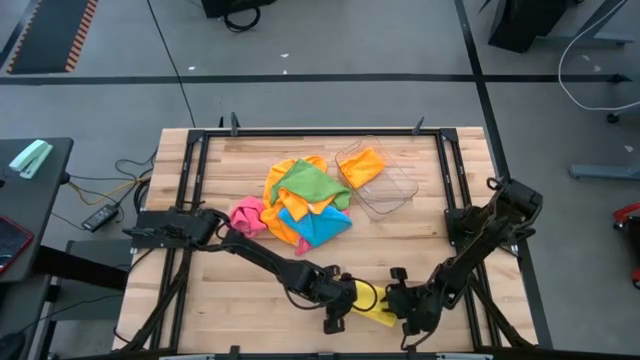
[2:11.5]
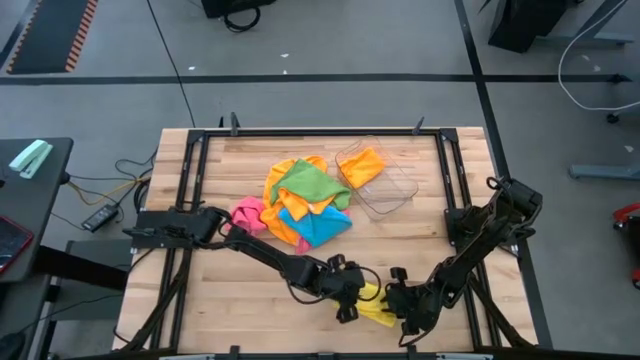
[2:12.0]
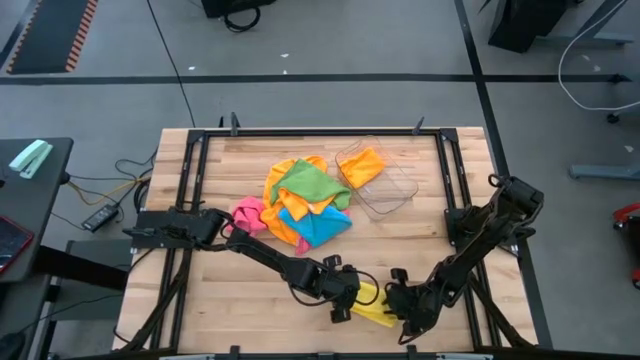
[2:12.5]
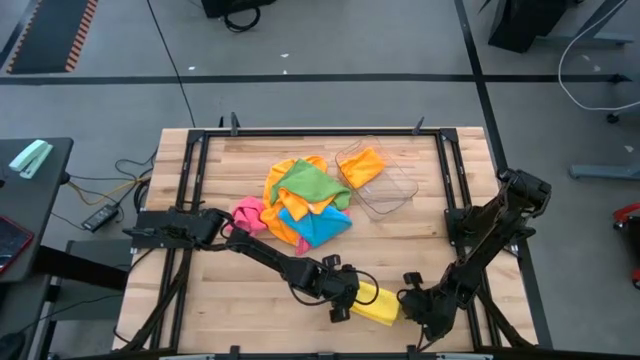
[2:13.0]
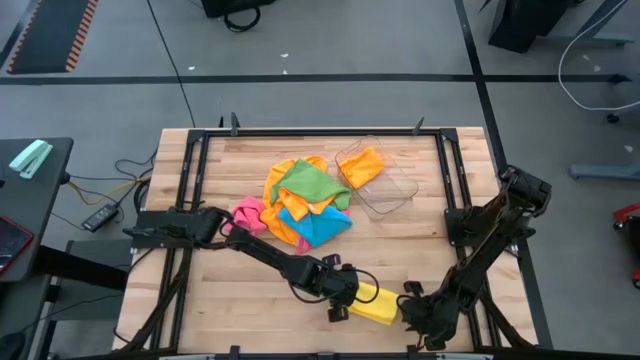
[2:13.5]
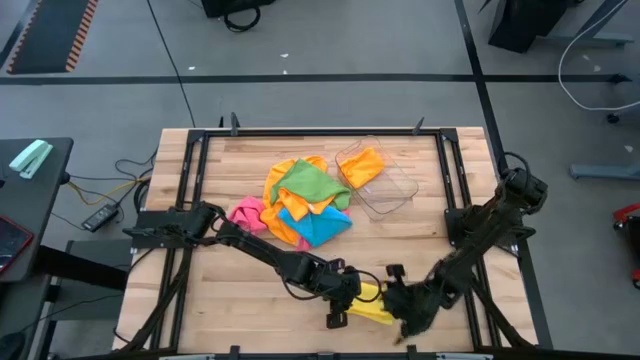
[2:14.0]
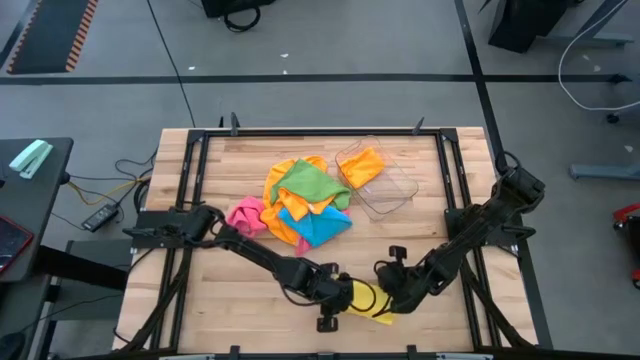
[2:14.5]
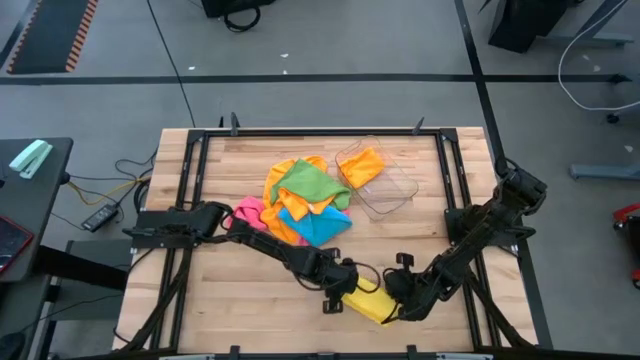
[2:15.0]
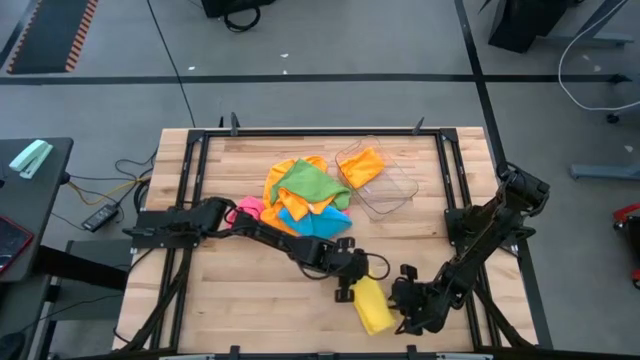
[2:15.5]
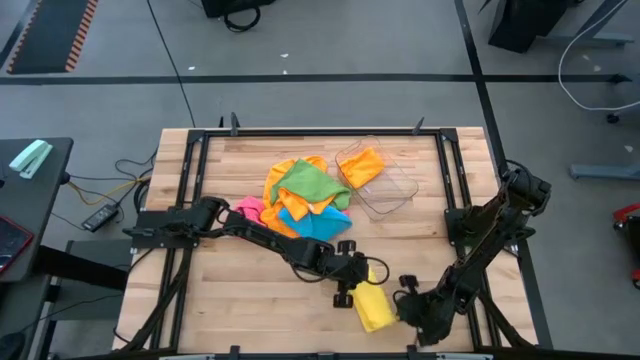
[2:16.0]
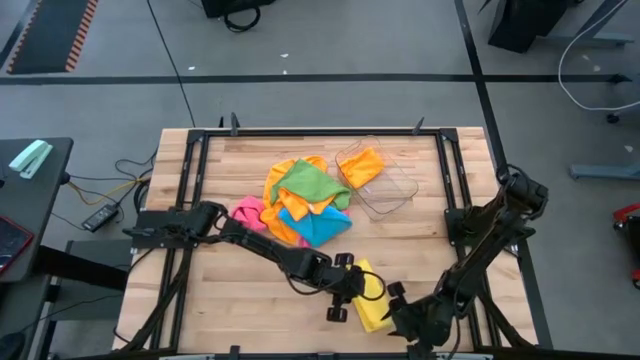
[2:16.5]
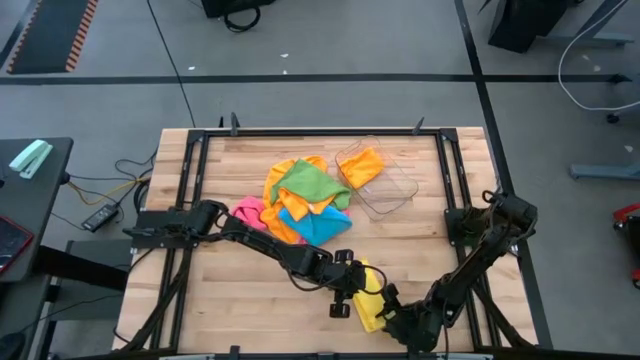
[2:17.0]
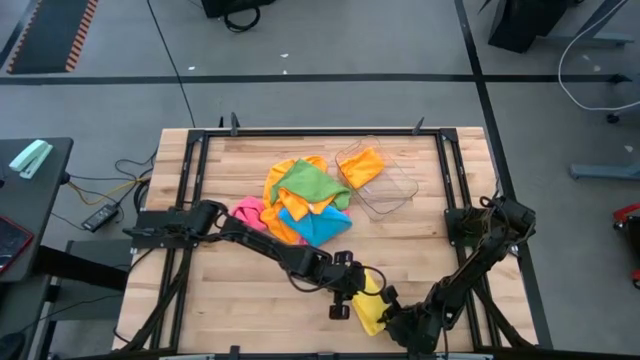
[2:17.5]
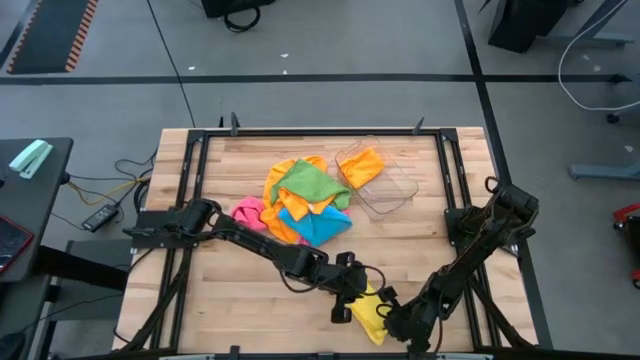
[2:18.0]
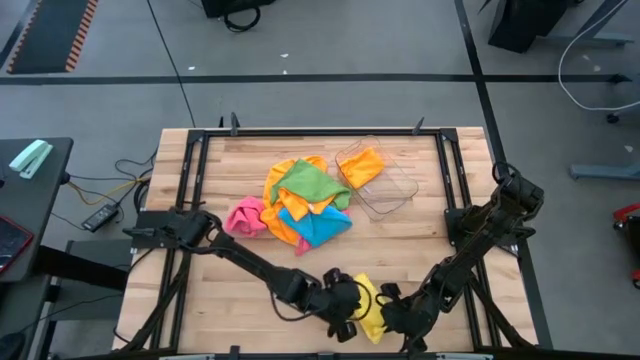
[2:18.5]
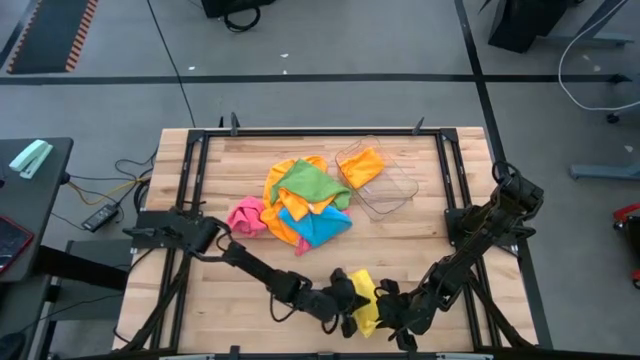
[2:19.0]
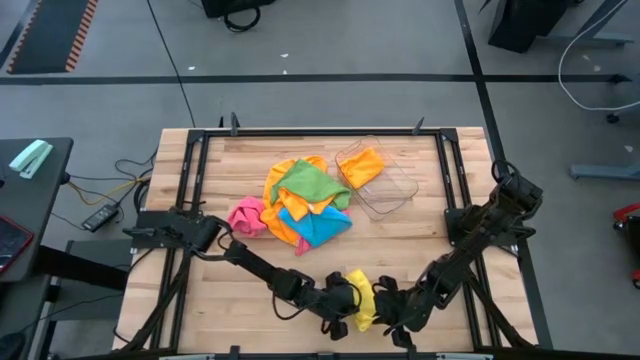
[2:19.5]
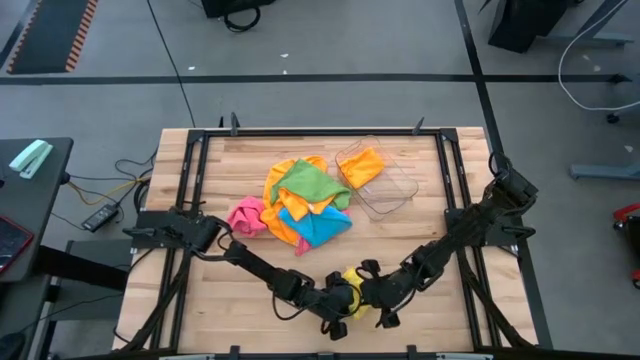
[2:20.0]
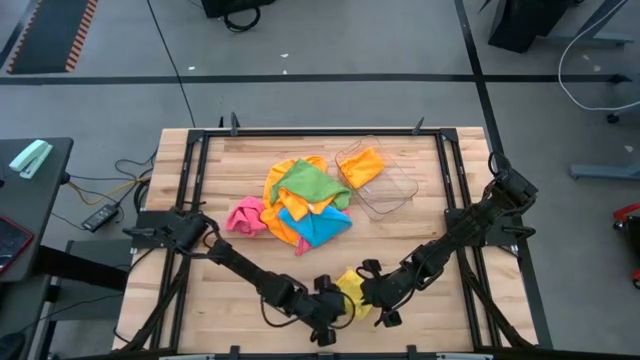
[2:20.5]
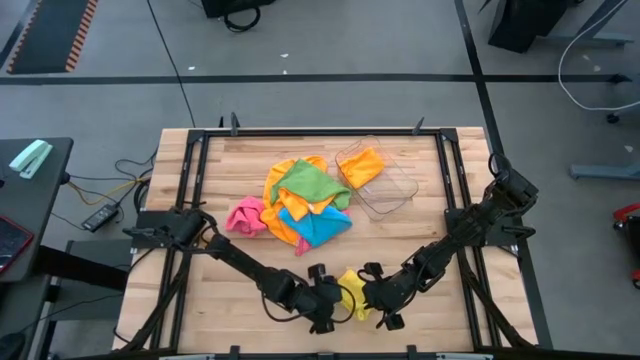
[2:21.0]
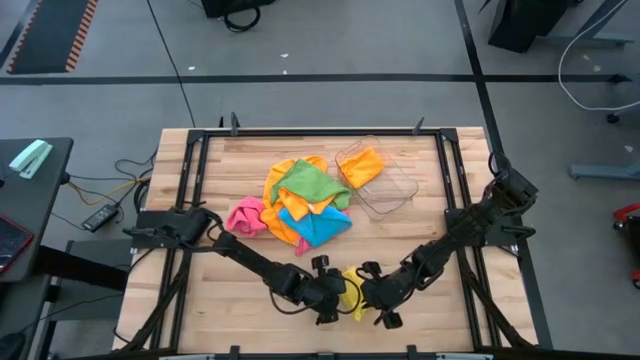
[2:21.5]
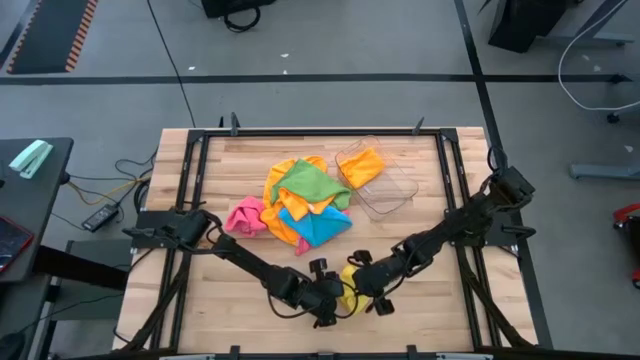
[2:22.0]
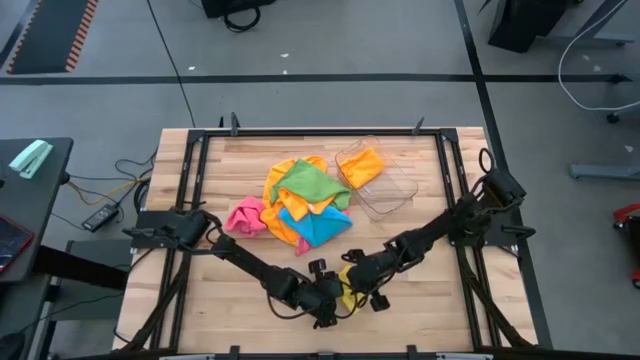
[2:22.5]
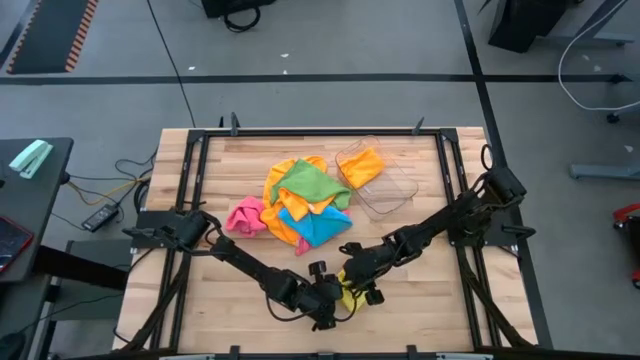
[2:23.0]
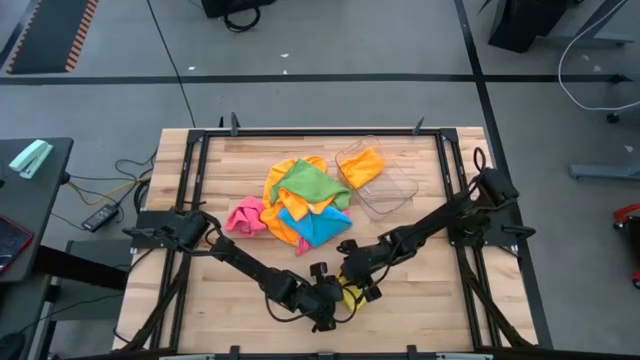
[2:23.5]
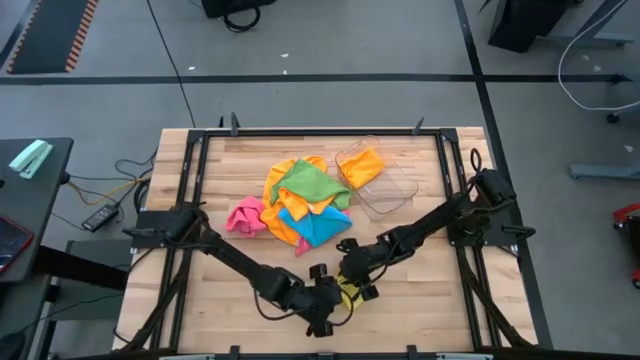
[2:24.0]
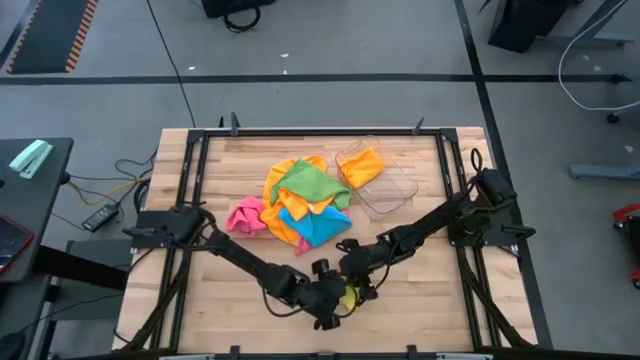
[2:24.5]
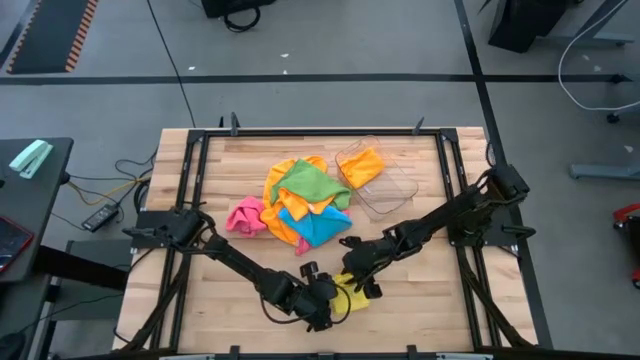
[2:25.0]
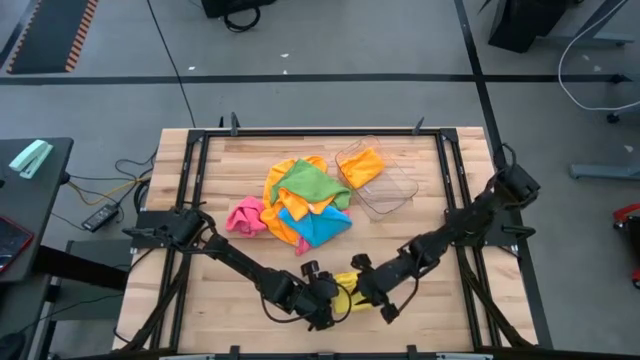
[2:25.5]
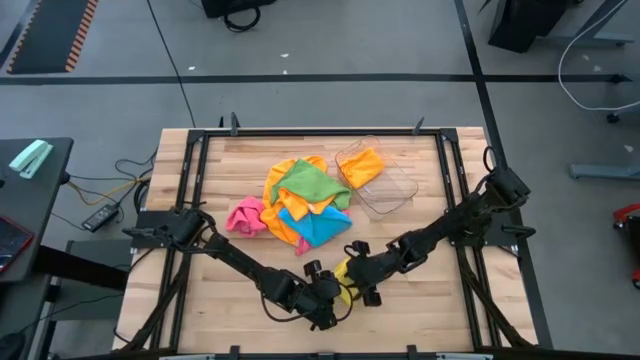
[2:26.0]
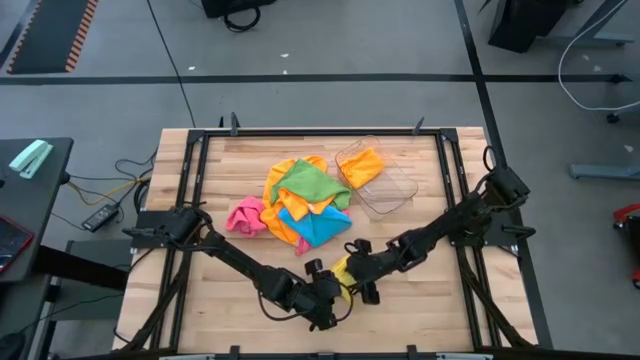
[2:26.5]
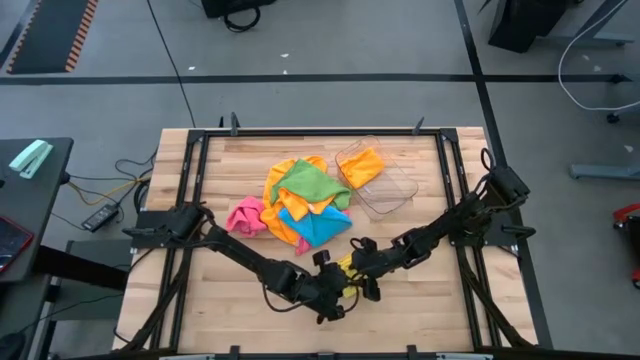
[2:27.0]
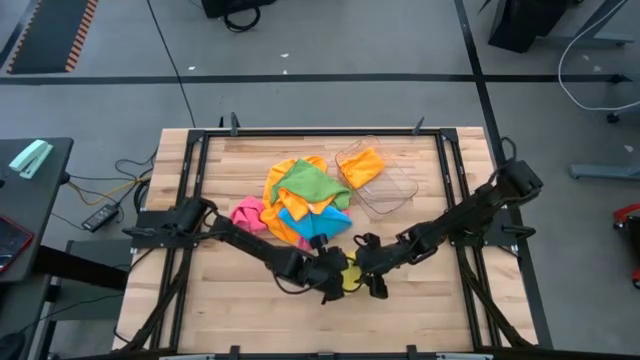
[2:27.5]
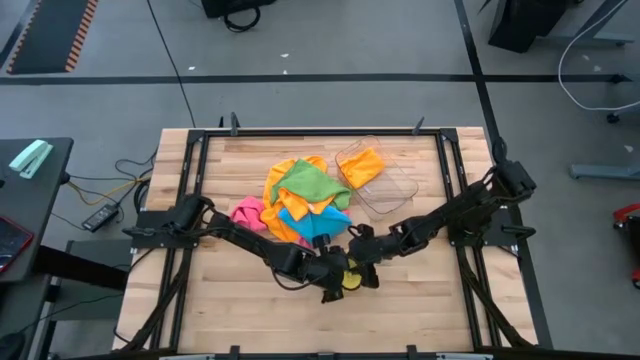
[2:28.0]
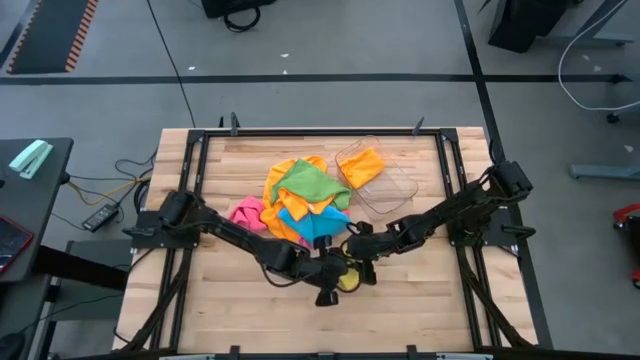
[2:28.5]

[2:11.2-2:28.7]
Task: Fold microfiber towels
Fold the yellow towel

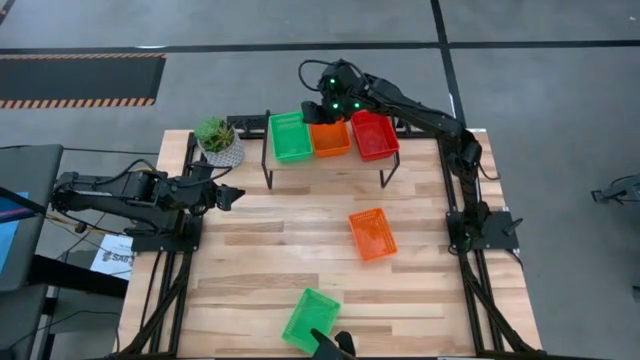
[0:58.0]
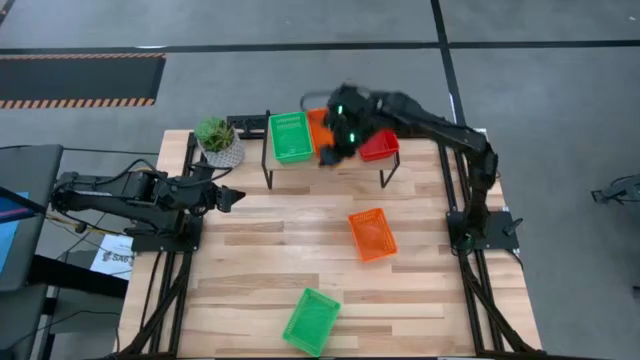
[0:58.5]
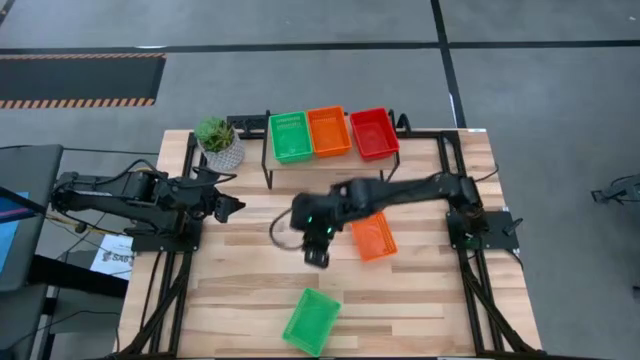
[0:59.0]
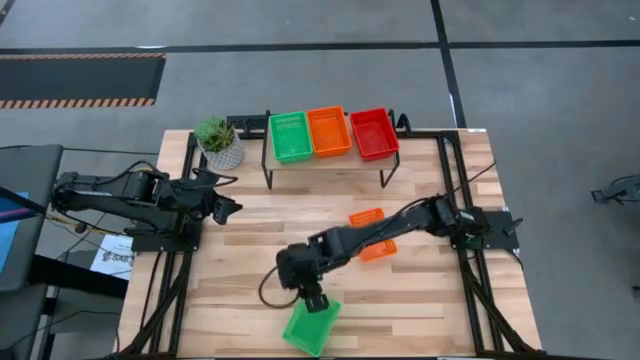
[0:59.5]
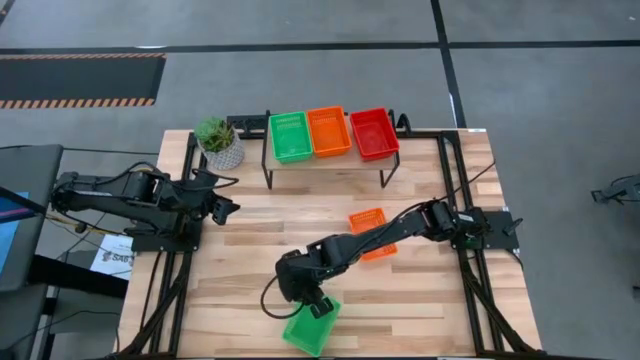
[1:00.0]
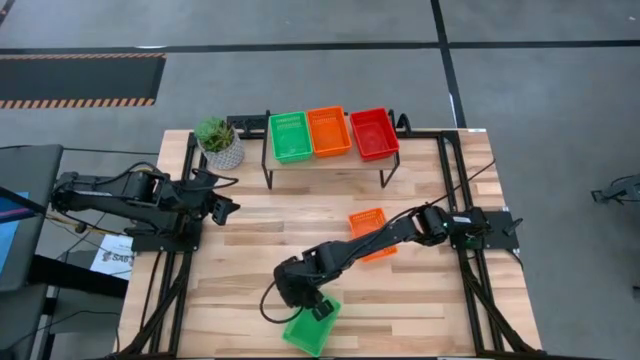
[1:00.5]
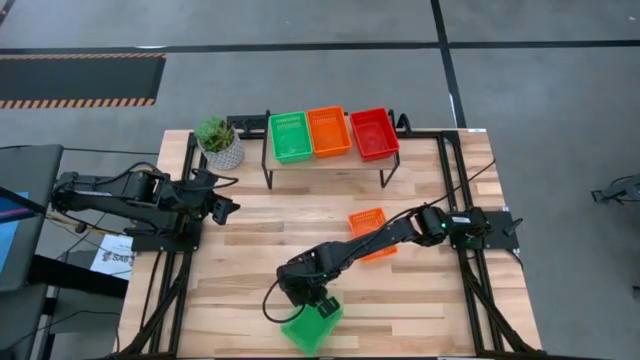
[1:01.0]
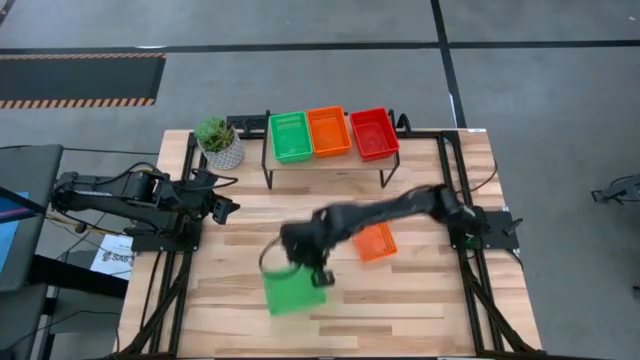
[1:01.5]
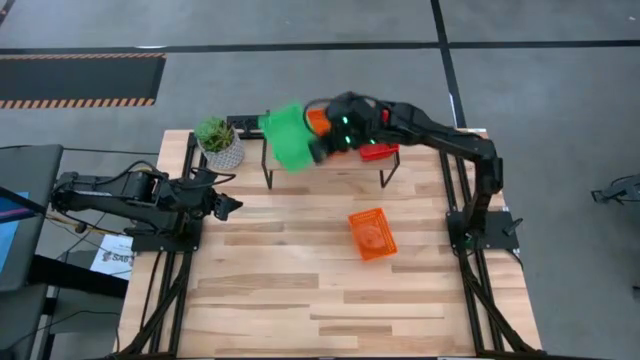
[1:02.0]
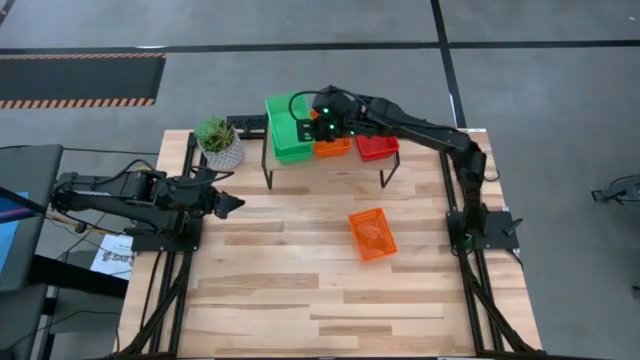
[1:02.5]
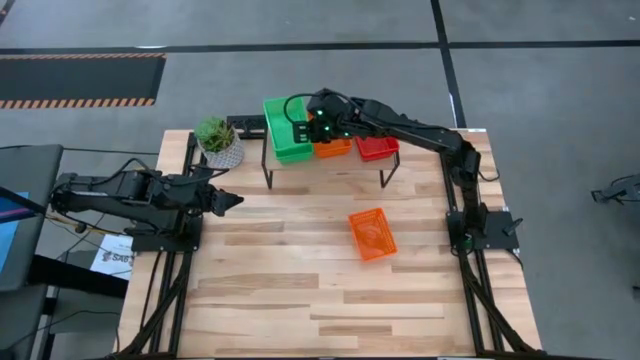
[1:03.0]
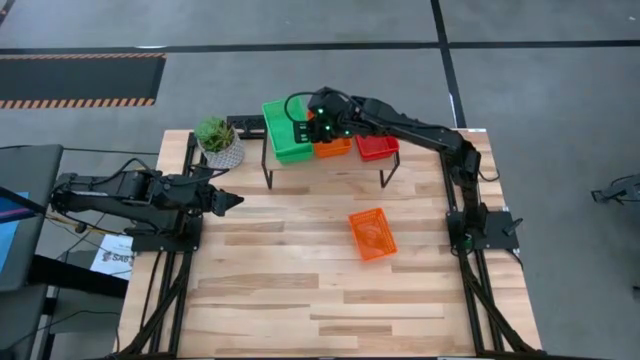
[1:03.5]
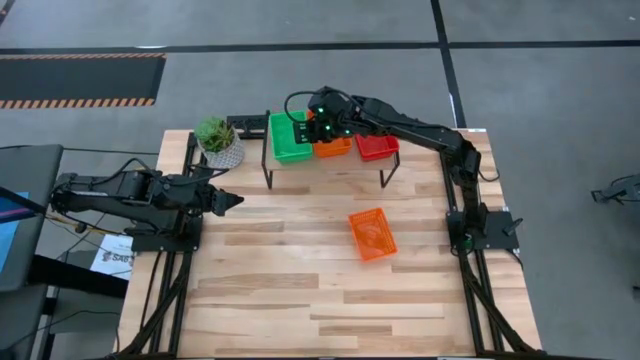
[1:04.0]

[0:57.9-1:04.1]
Task: Stack baskets on shelf by color
Stack the green bin on top of the green bin on the shelf
